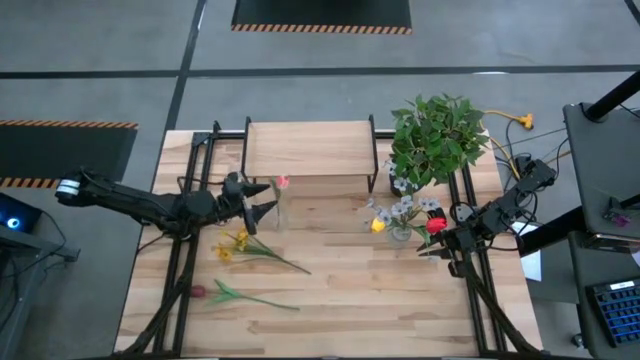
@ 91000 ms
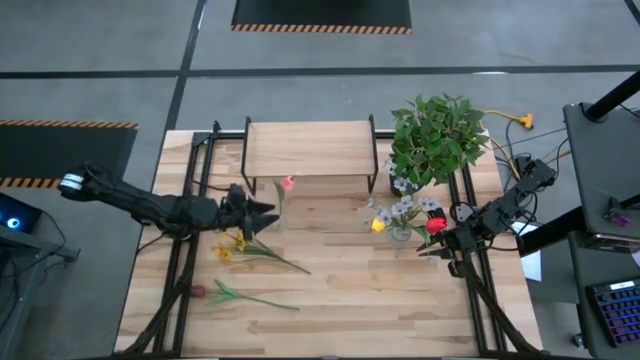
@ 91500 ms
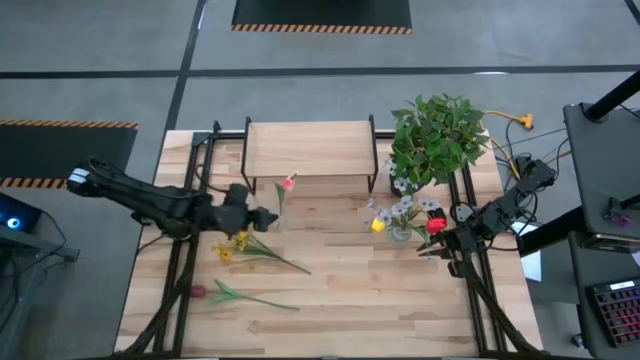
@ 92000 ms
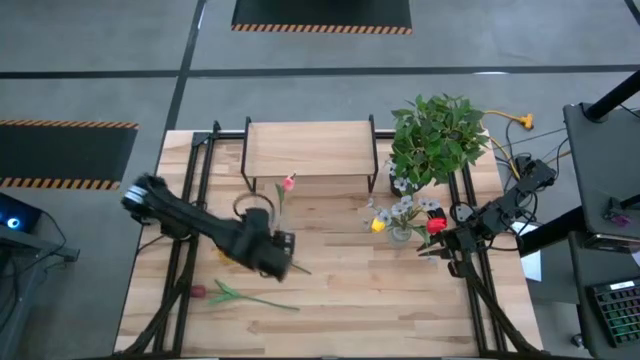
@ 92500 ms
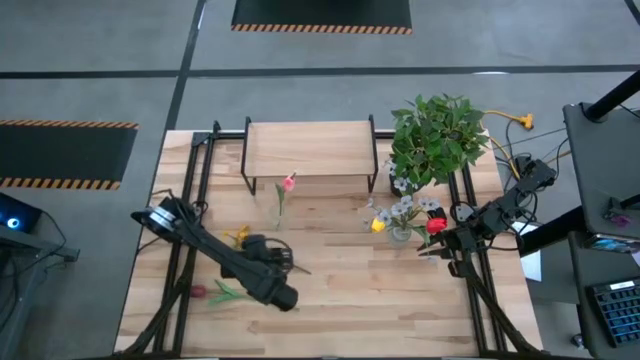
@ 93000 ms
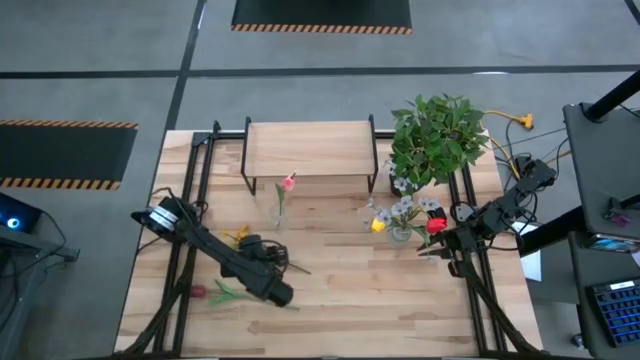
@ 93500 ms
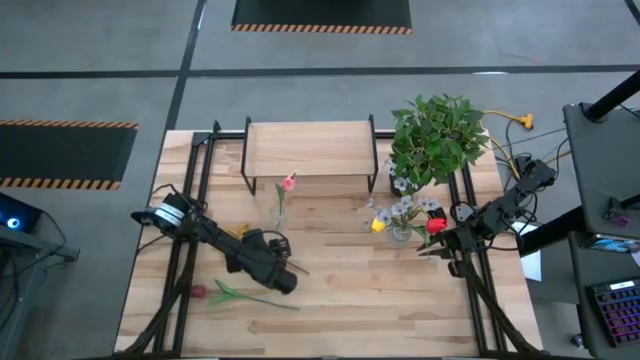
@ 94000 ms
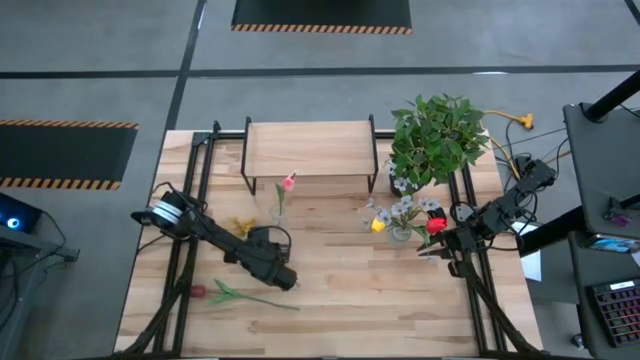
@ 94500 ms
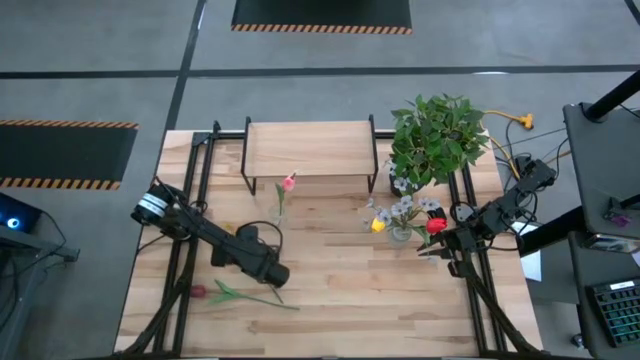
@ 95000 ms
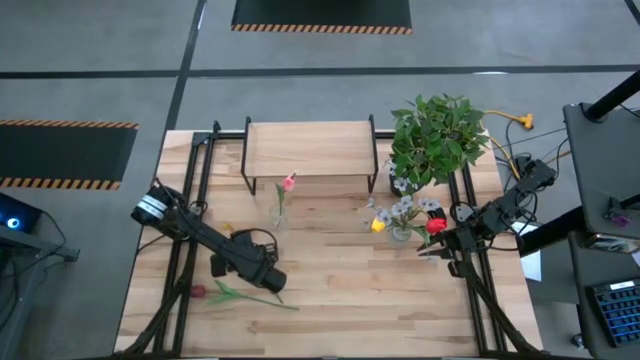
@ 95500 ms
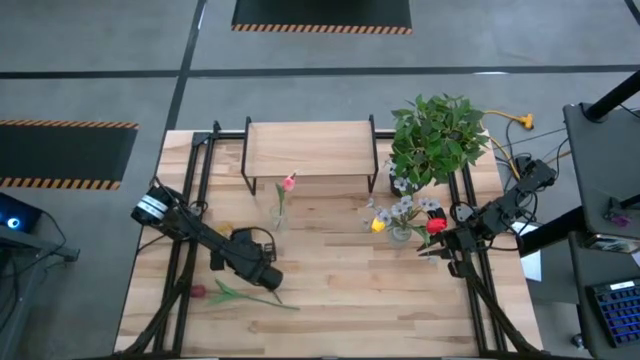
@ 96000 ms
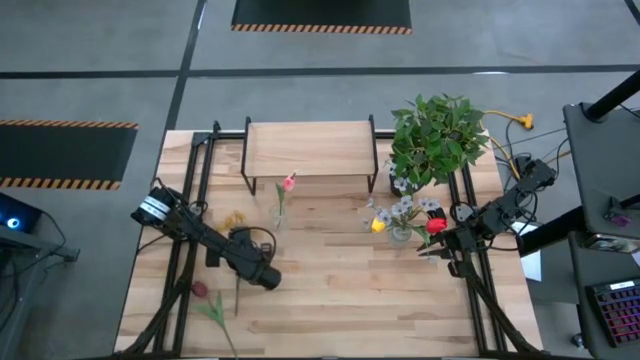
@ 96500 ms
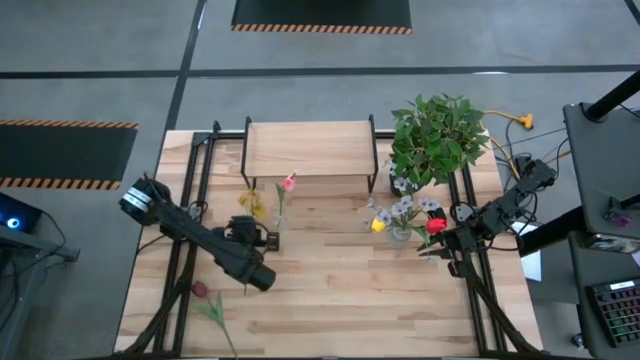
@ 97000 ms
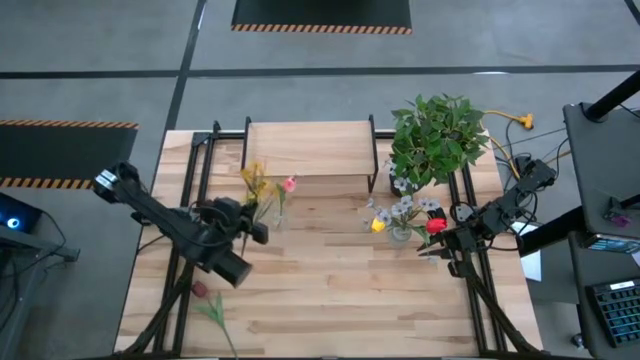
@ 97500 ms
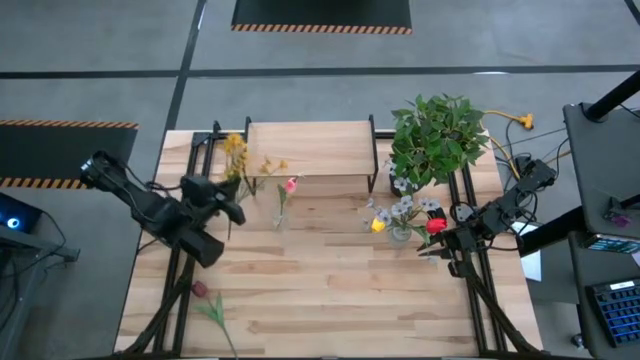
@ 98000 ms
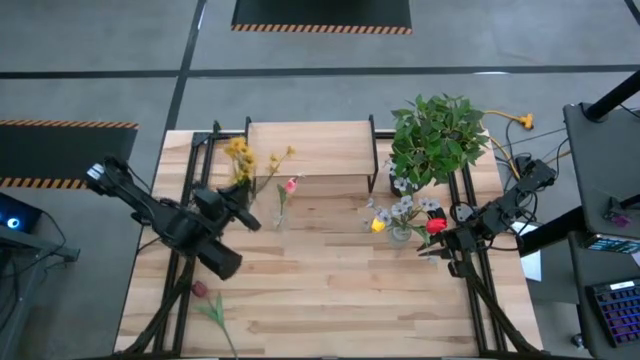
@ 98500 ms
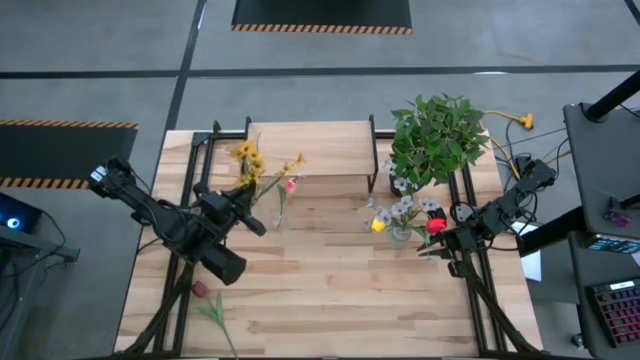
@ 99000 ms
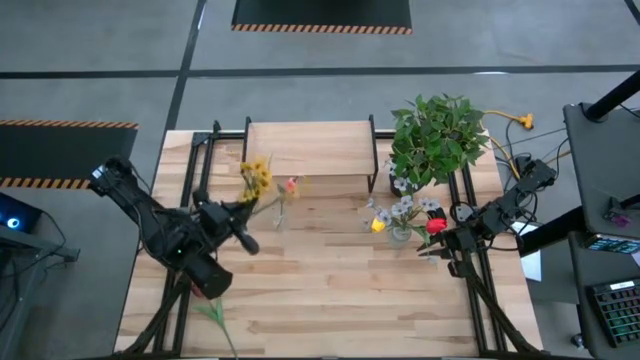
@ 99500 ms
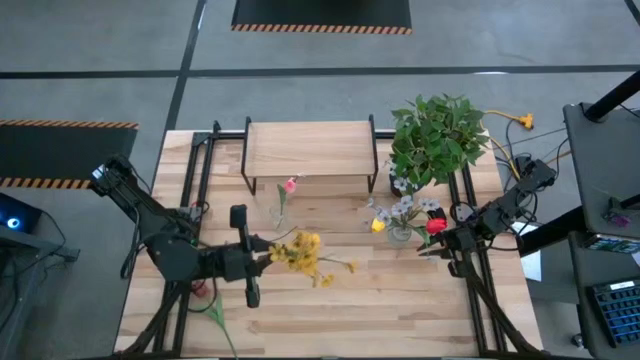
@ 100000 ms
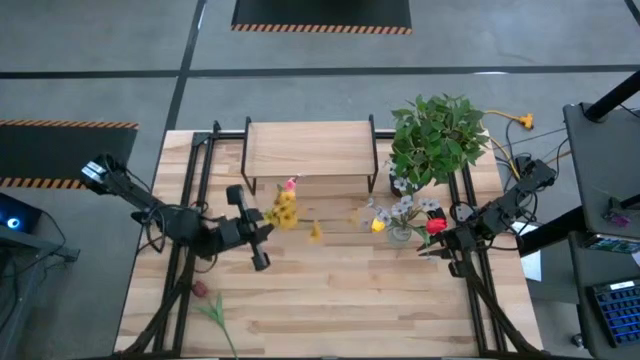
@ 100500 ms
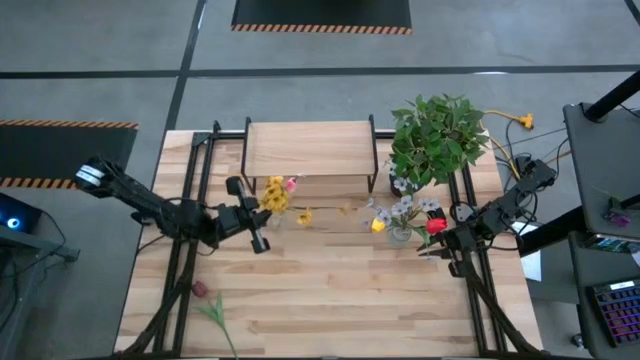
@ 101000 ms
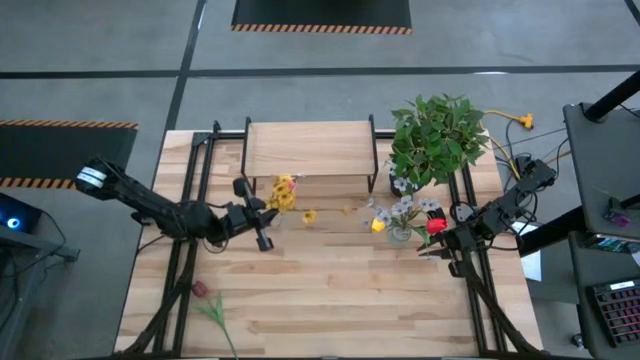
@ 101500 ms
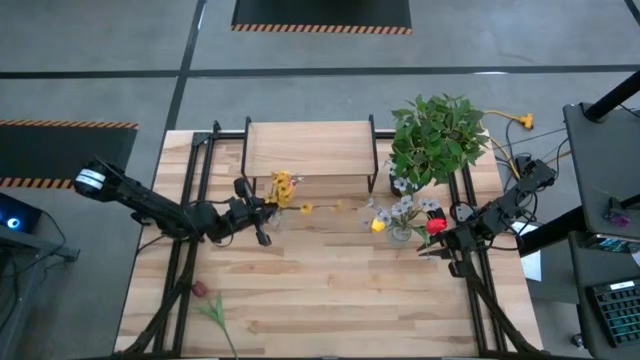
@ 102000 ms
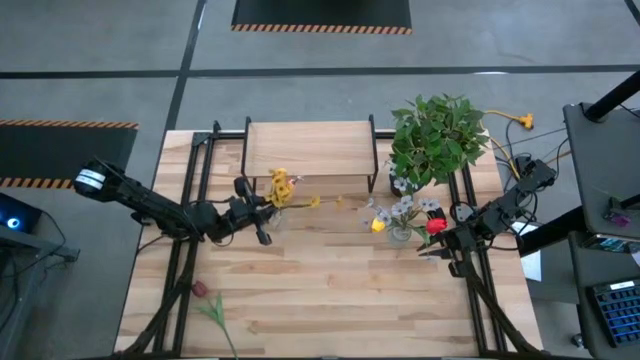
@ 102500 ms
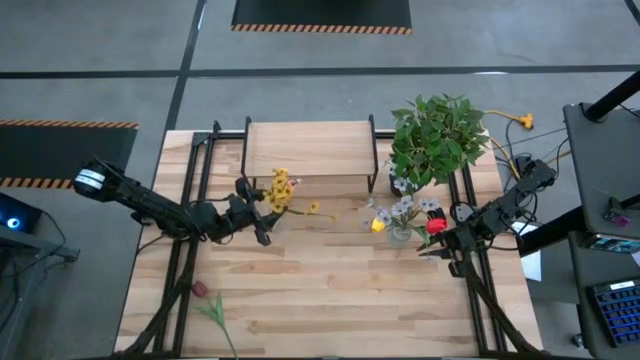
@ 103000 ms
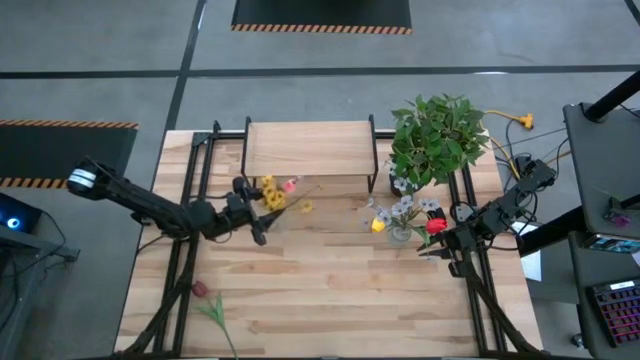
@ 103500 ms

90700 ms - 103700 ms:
Task: Pick and place flowers into a vace then onto a shelf
Put the yellow flowers into the left transparent vase

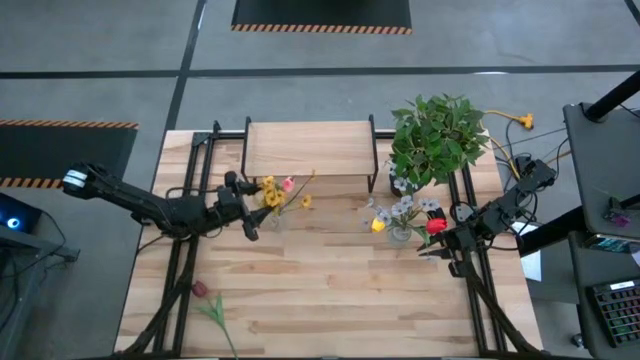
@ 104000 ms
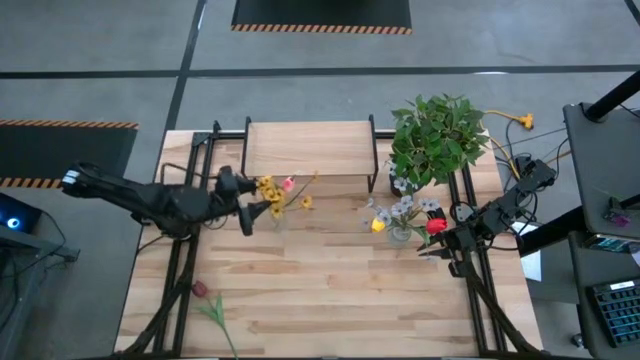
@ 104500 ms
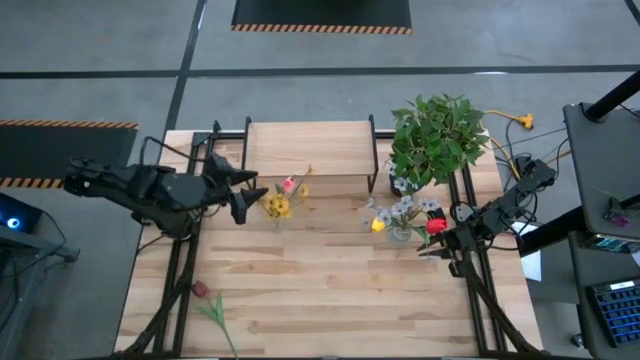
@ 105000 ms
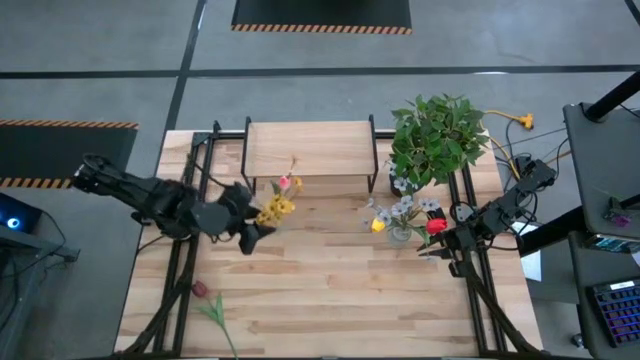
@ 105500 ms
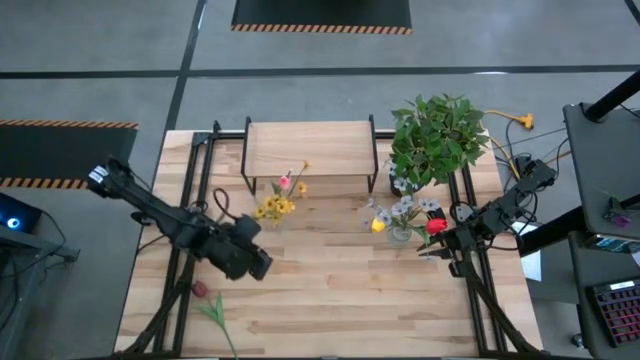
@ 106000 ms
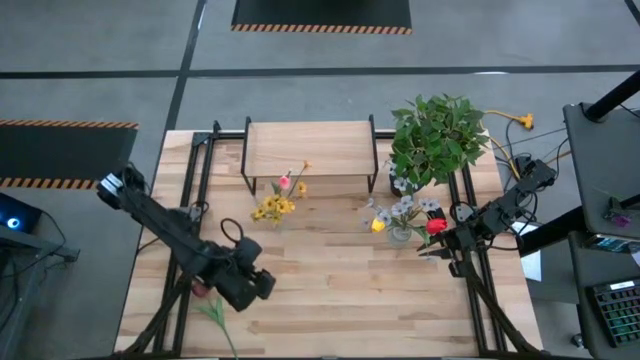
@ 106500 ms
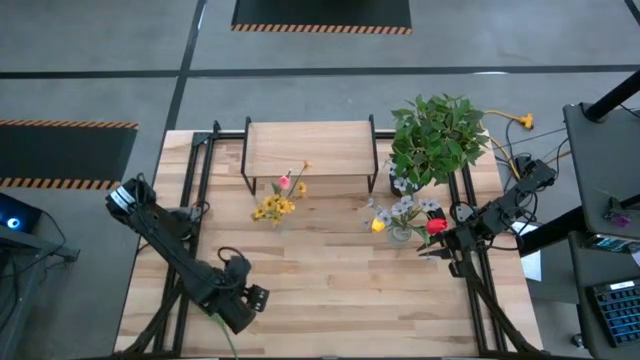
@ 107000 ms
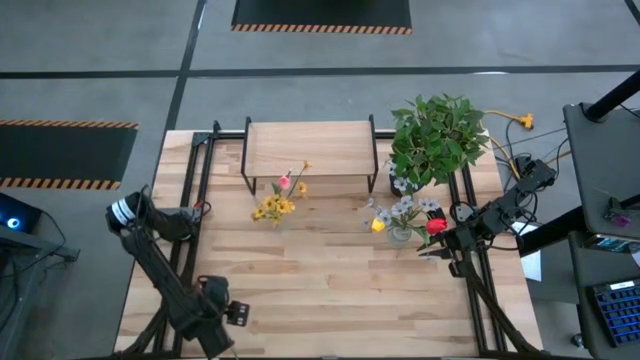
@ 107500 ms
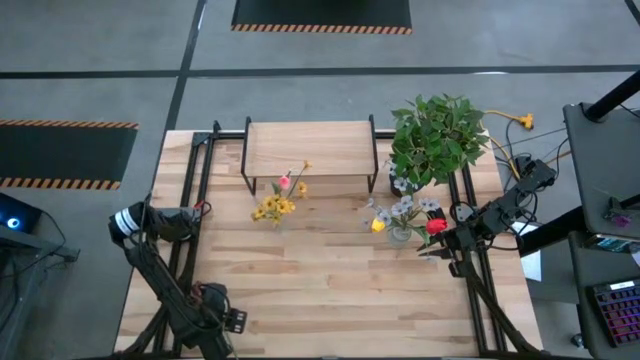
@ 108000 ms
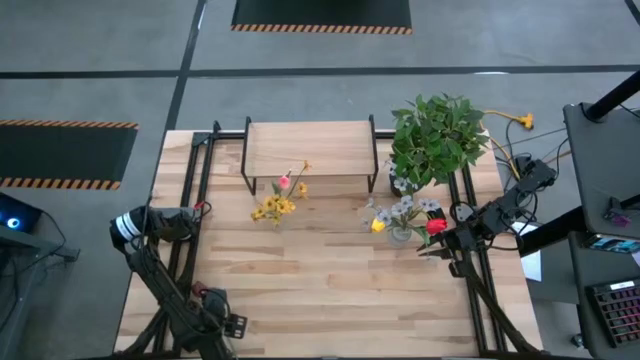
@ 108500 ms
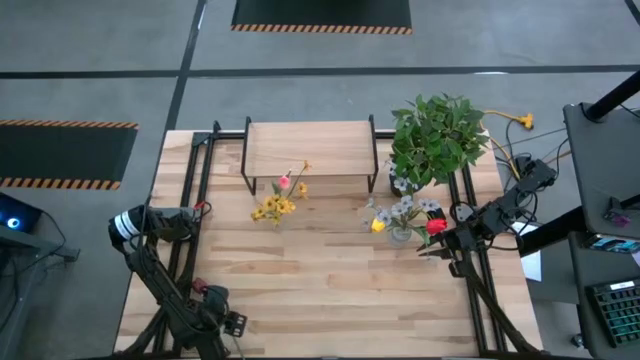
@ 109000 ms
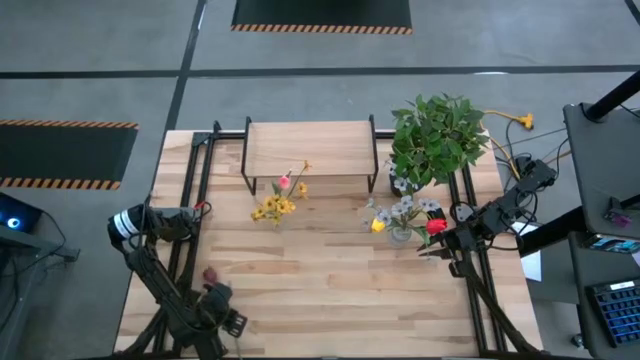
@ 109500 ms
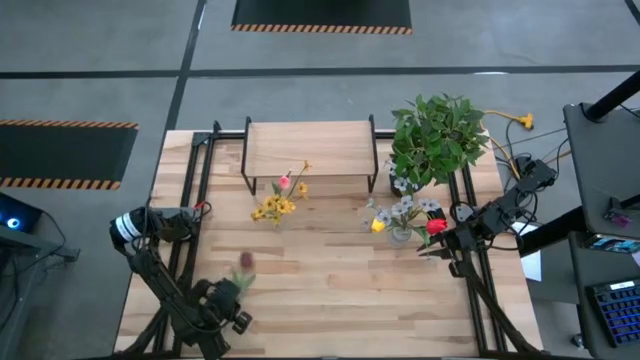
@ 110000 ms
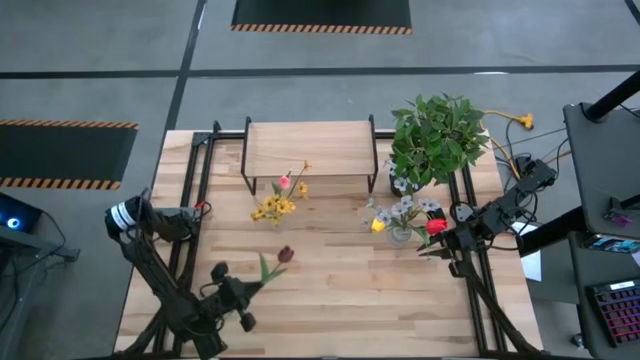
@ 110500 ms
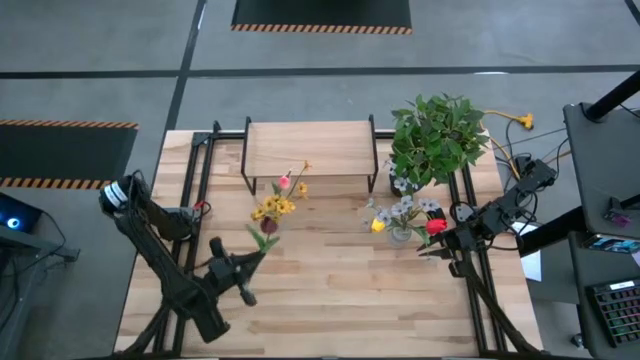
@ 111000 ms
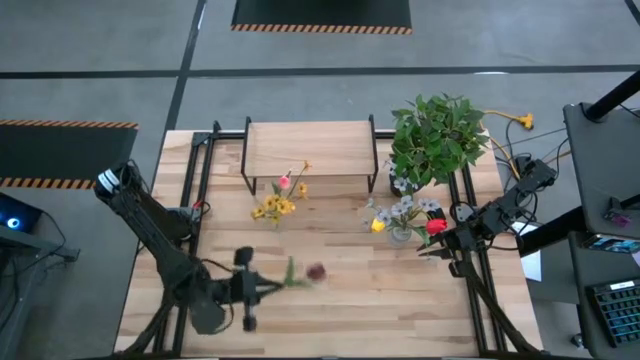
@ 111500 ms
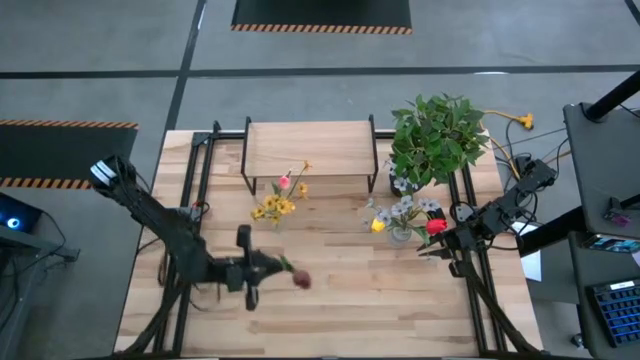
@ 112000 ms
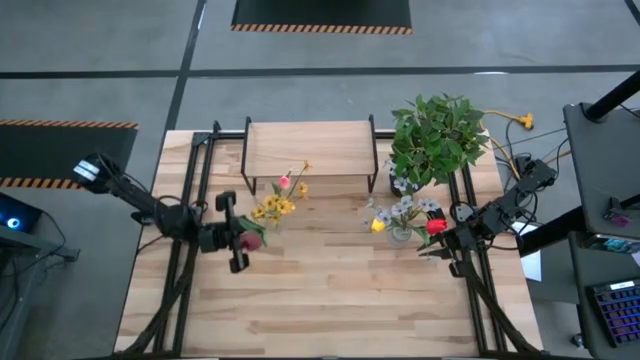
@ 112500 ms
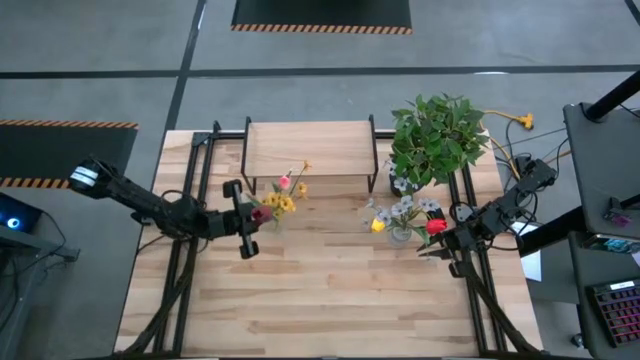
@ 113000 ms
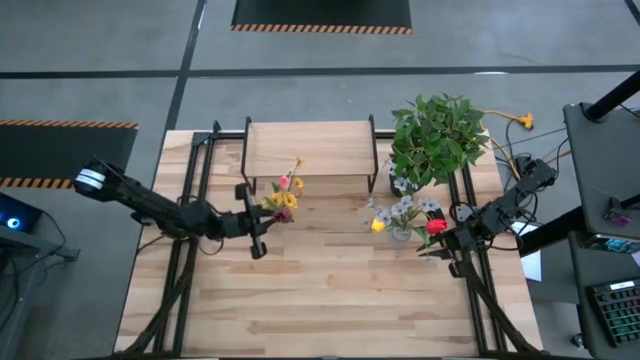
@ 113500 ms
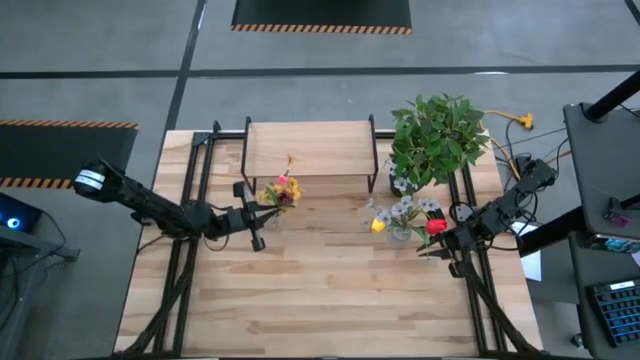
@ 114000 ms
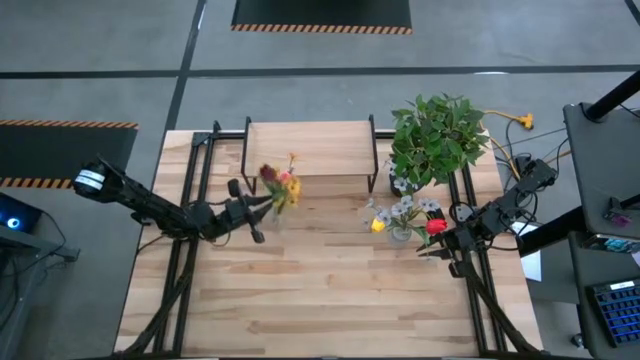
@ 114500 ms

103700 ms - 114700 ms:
Put the dark red tulip into the left transparent vase
